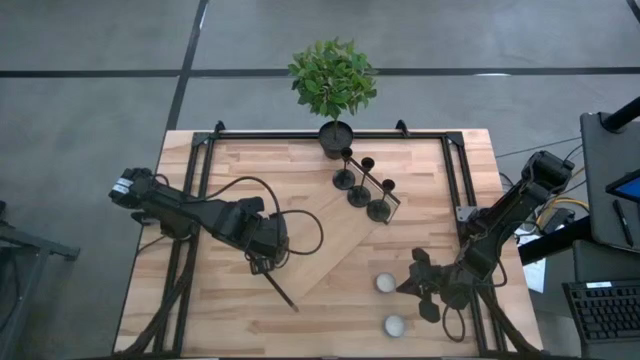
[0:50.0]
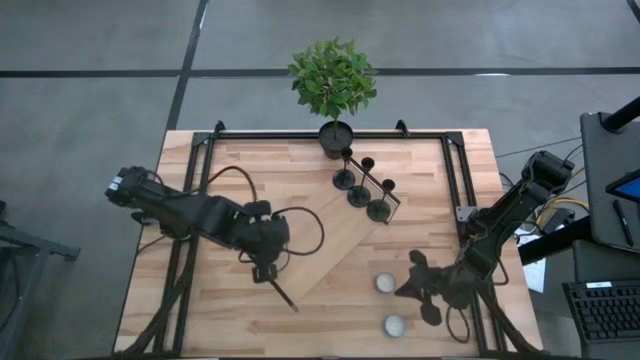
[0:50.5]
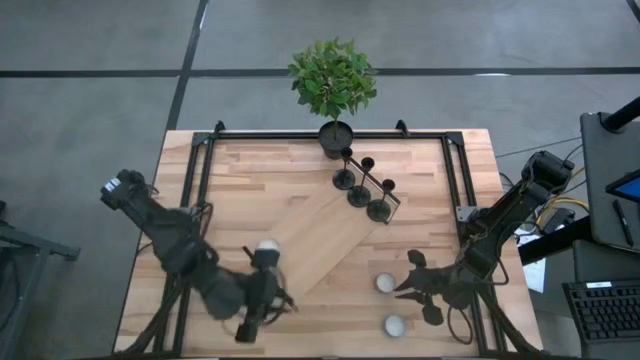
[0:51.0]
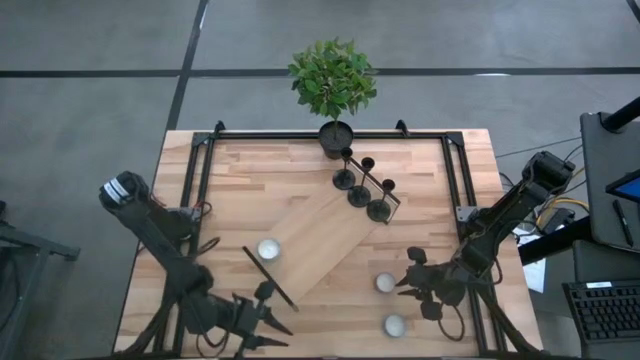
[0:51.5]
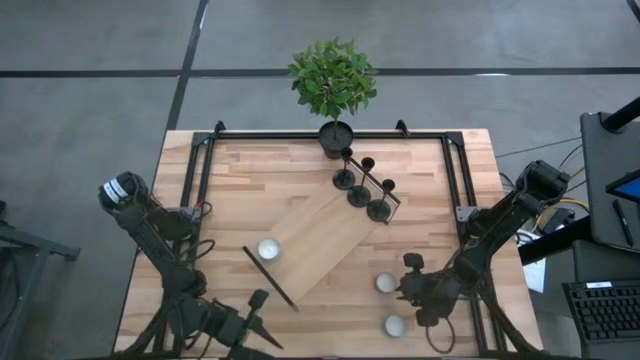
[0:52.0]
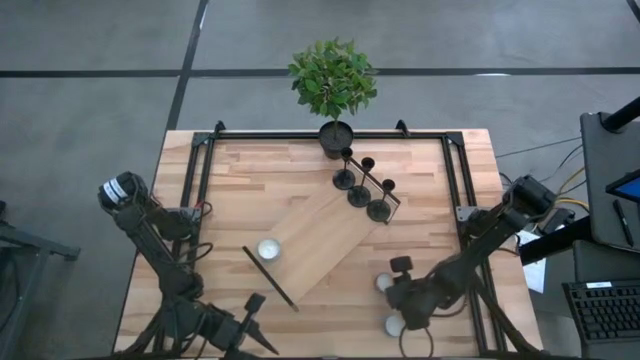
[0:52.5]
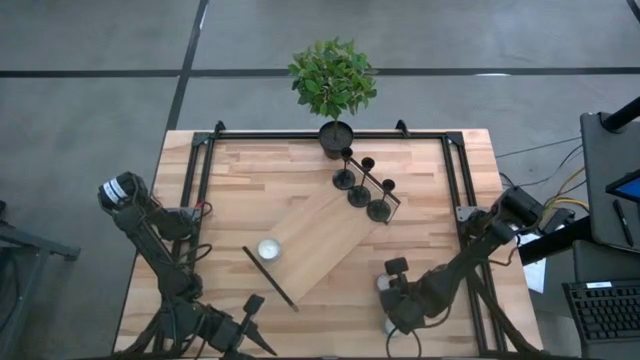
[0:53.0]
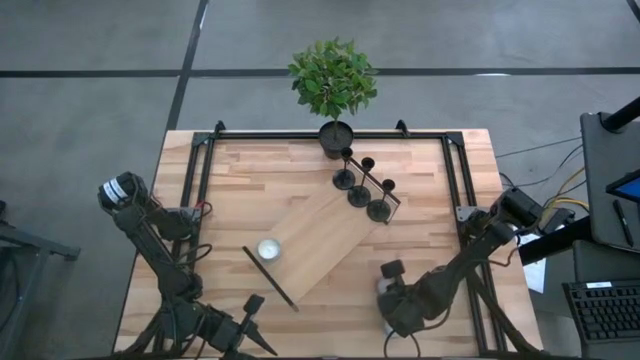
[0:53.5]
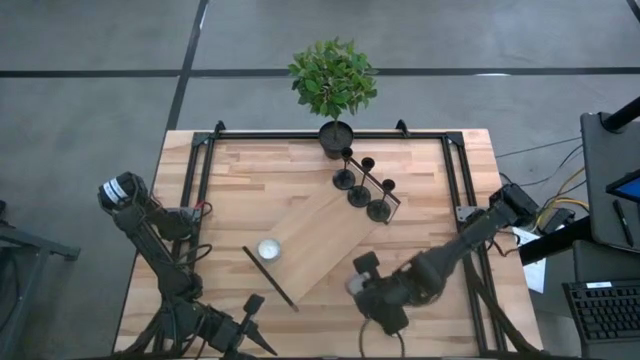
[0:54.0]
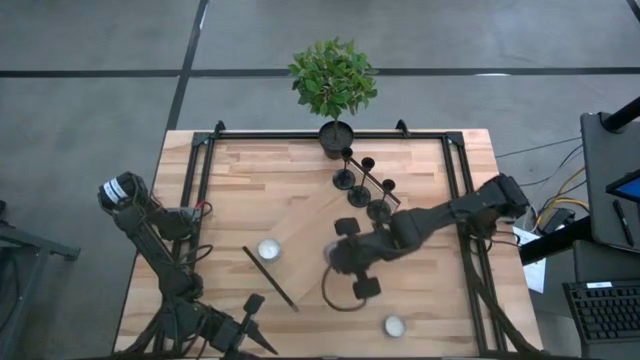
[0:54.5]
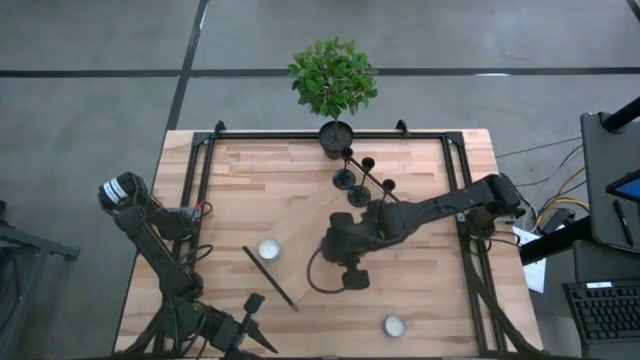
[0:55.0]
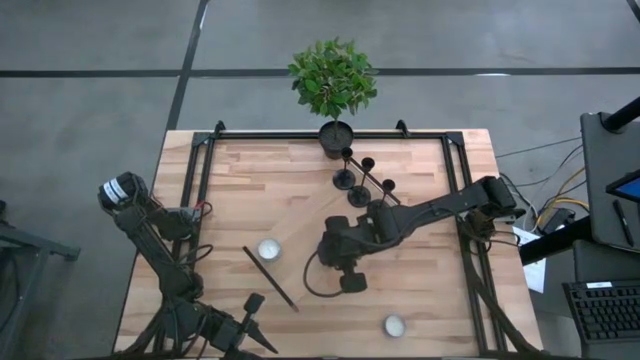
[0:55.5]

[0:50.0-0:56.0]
Task: Pick & Place candle stick holders
Put the pink scented candle on the shelf

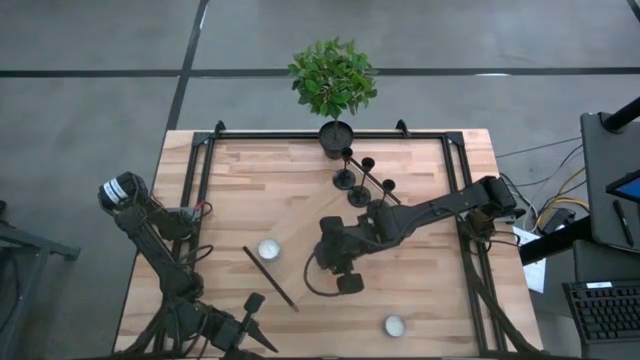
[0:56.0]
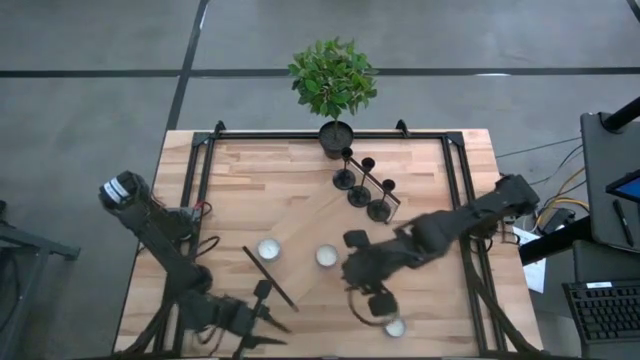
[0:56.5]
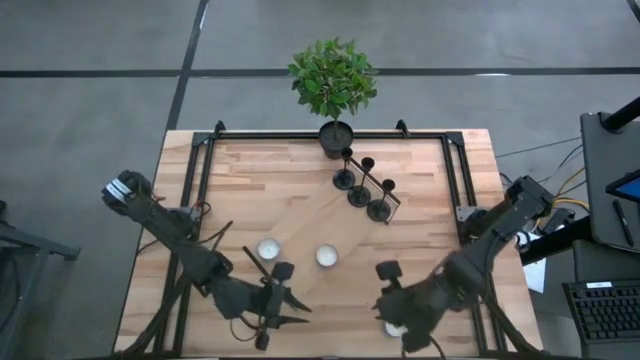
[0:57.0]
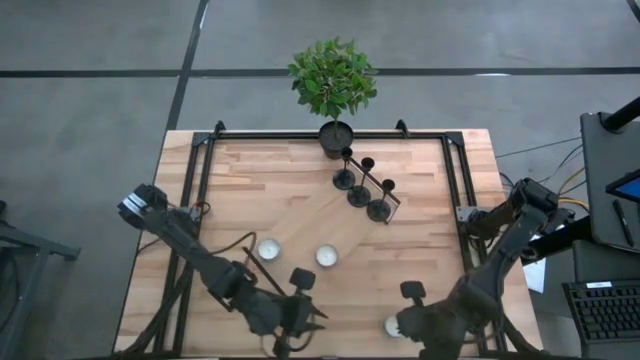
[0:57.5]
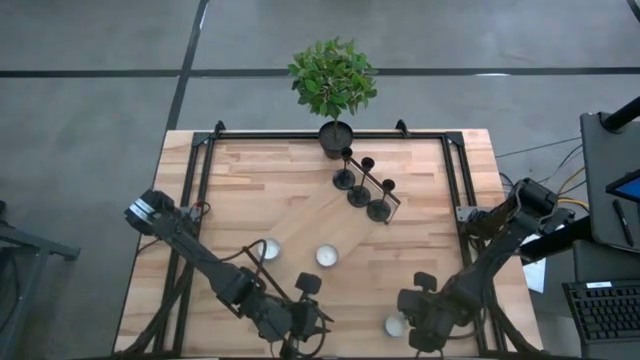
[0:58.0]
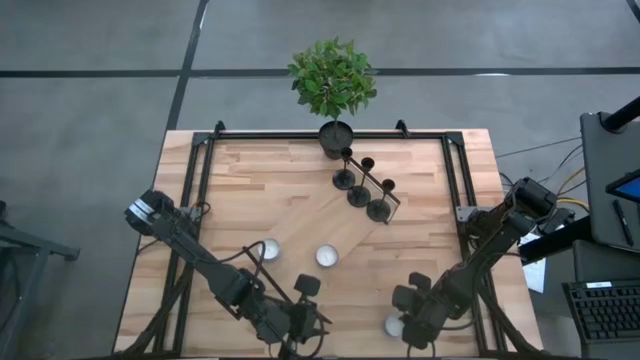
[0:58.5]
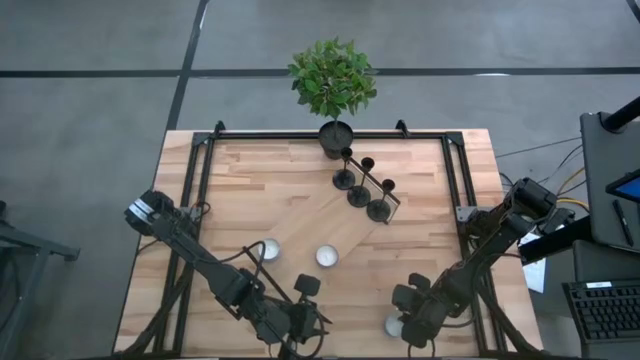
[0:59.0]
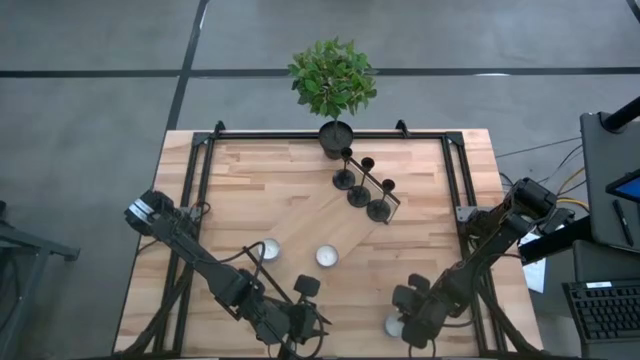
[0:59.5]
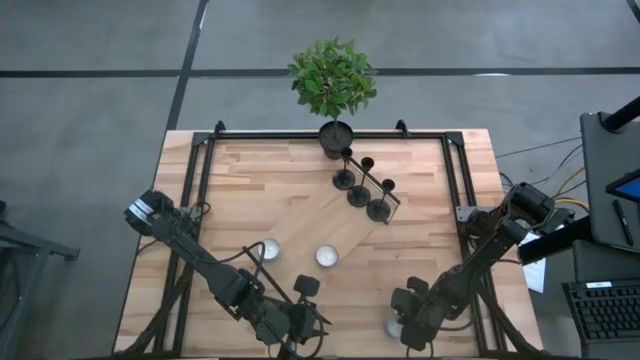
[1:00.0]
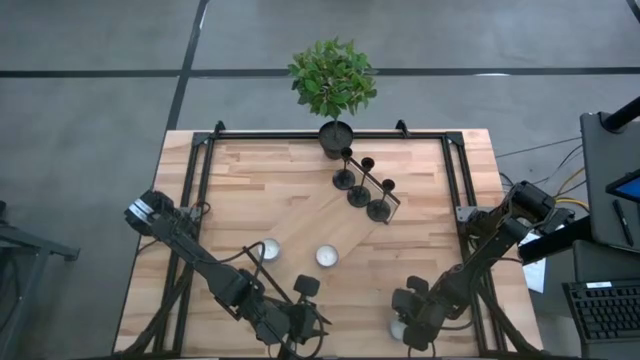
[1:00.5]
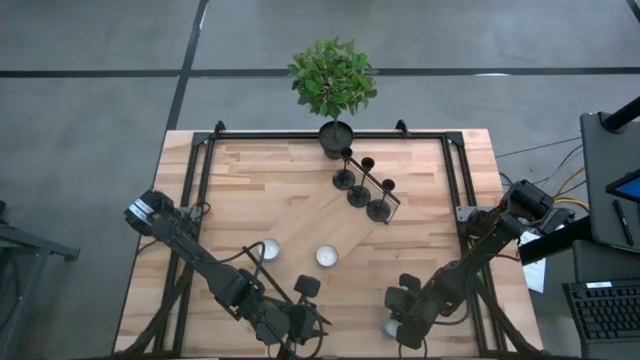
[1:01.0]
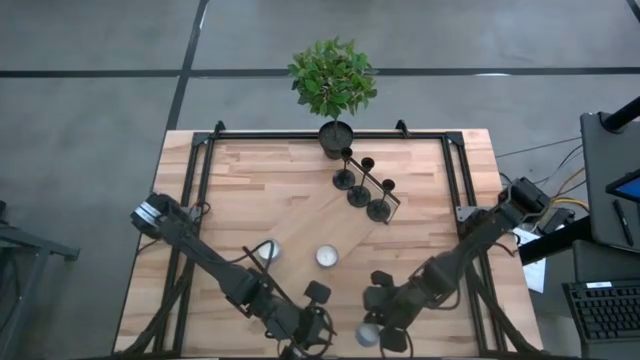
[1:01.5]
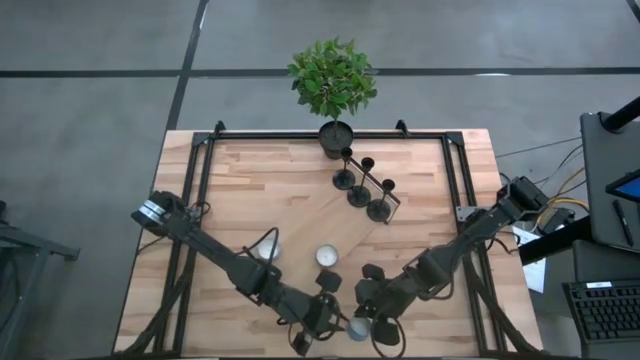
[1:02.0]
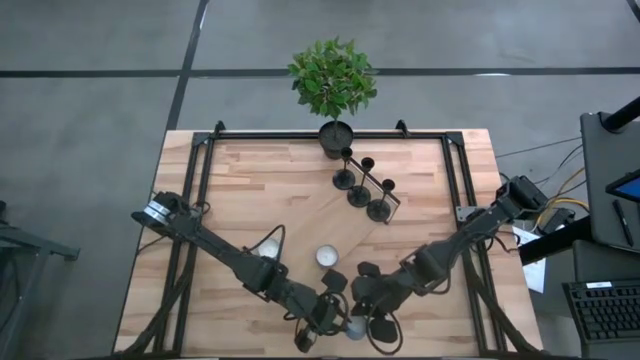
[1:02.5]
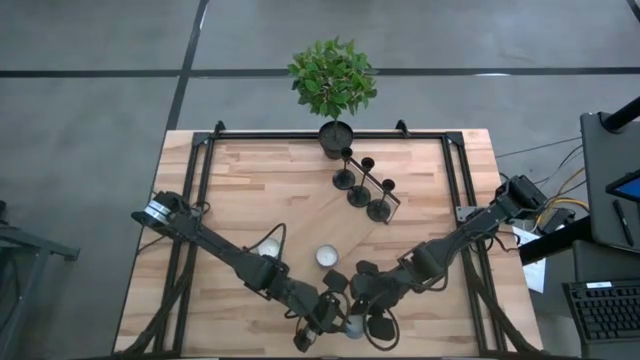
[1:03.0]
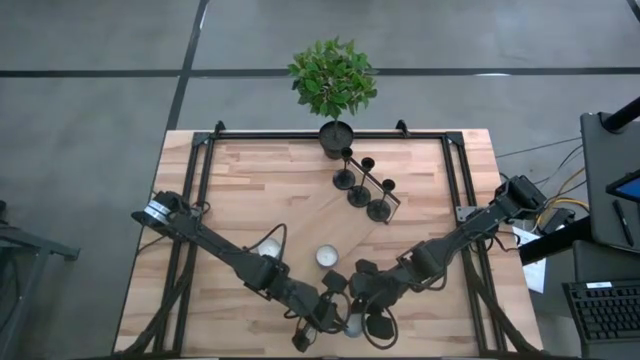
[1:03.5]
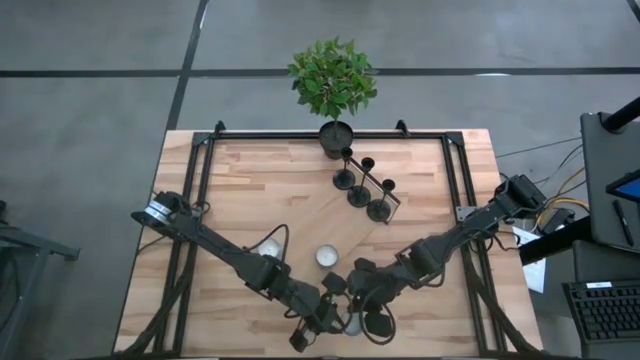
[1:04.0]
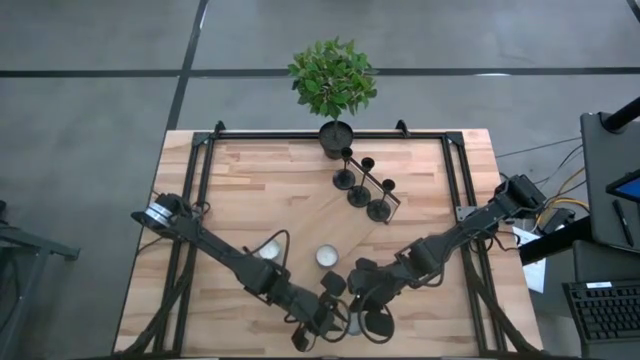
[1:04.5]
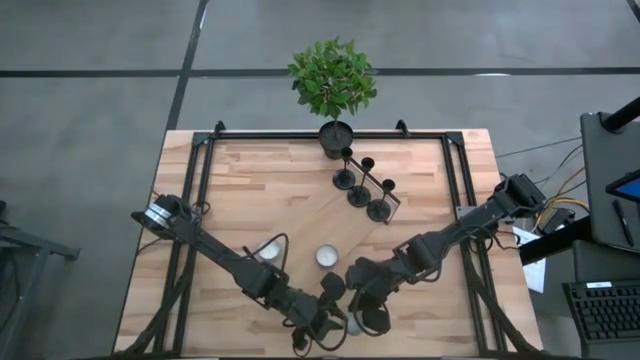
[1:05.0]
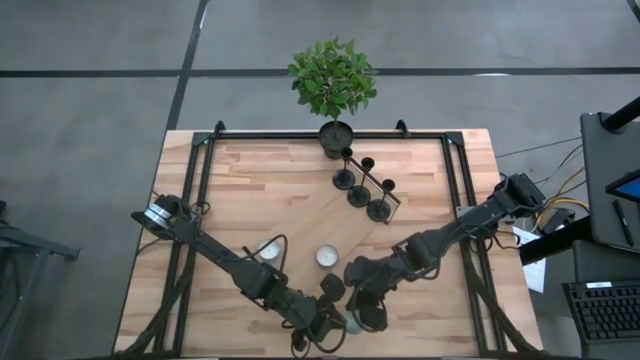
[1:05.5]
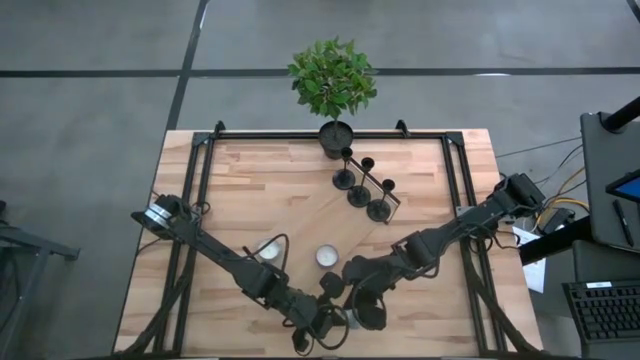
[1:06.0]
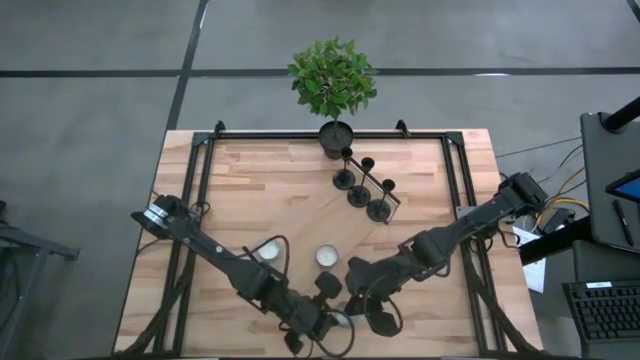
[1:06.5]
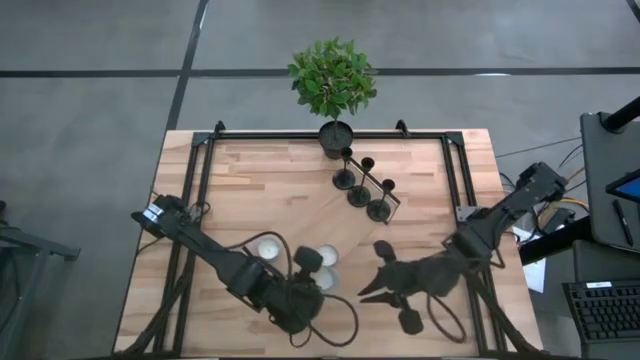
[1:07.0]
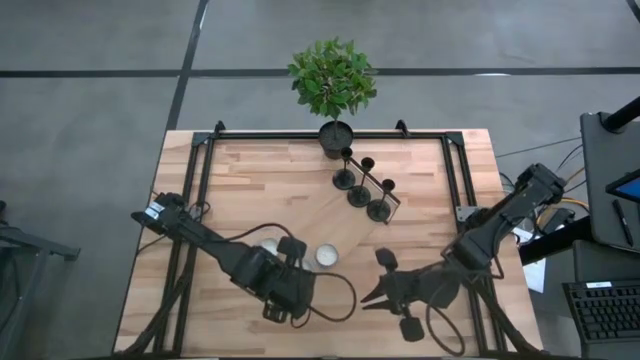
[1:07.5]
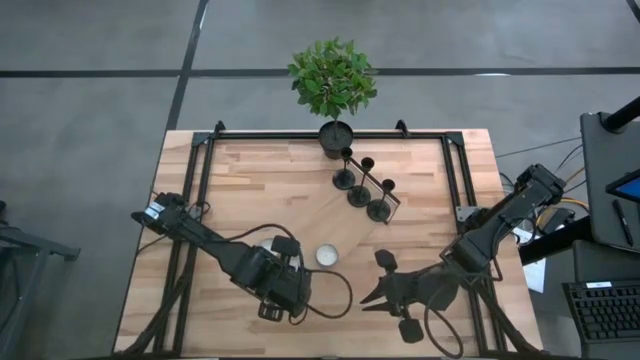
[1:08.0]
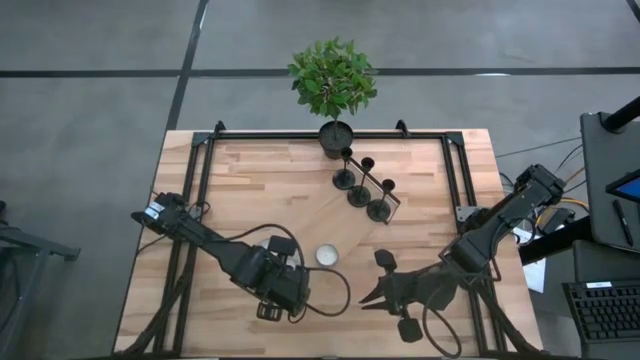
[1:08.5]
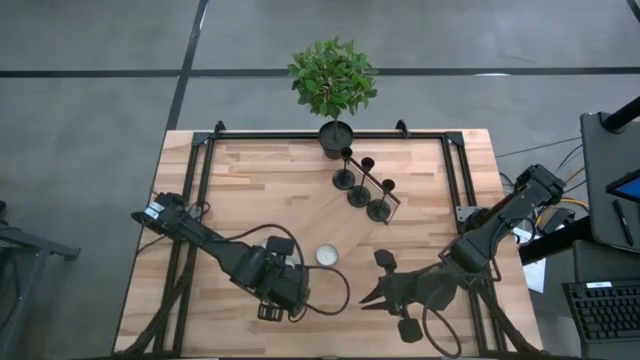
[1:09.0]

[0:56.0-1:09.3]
Put the blue scented candle on the shelf

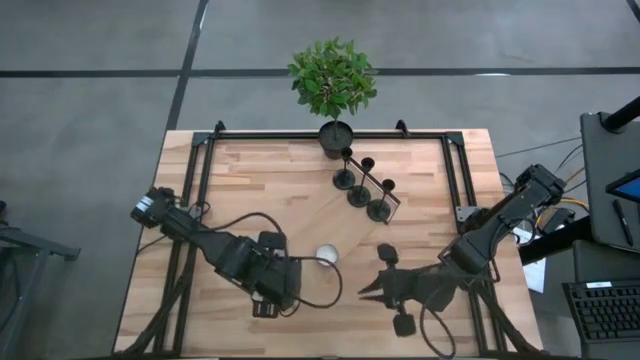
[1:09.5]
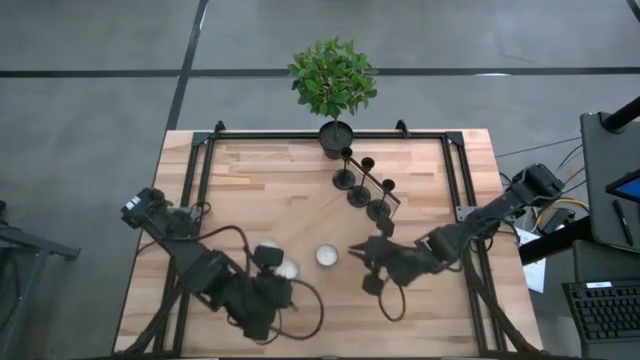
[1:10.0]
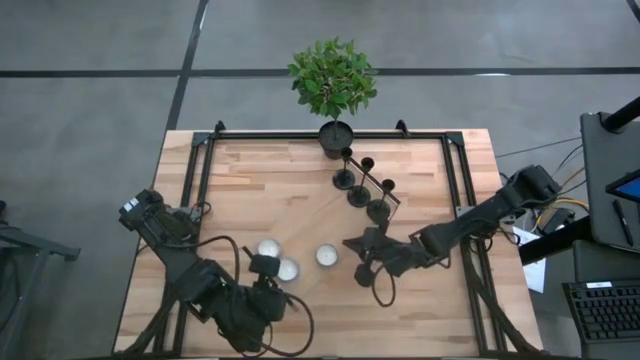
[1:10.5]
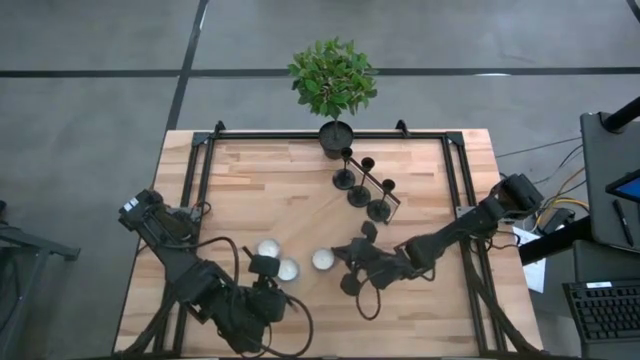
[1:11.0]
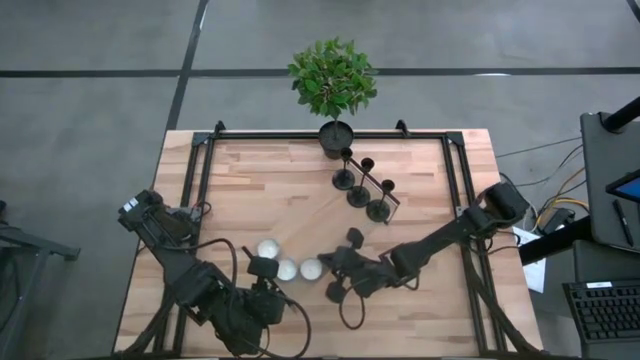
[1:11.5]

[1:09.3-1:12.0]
Adjust the red patterned scented candle on the shelf
